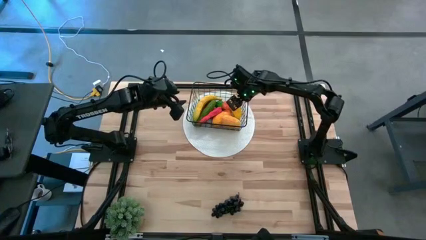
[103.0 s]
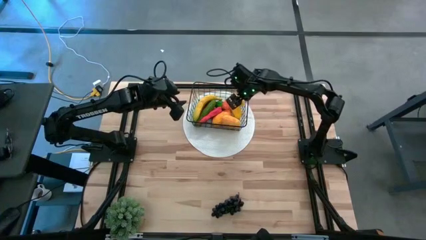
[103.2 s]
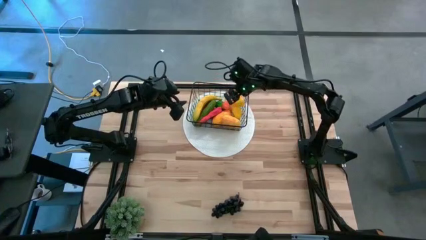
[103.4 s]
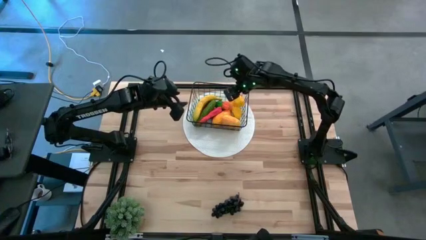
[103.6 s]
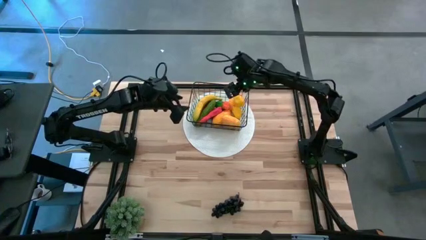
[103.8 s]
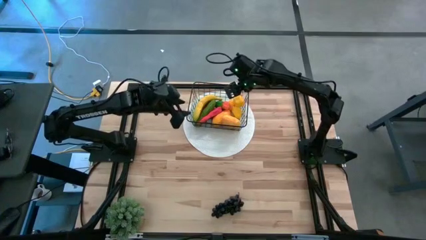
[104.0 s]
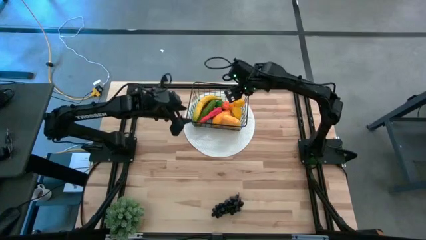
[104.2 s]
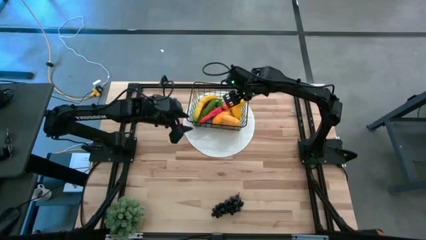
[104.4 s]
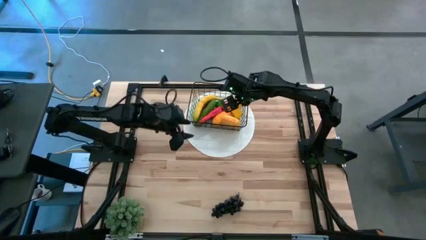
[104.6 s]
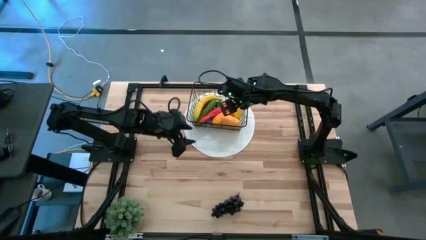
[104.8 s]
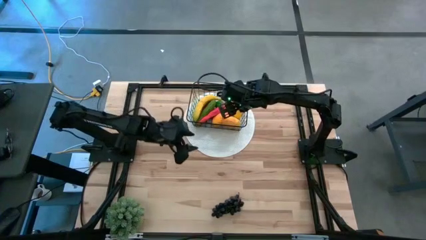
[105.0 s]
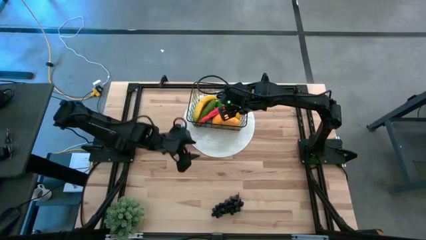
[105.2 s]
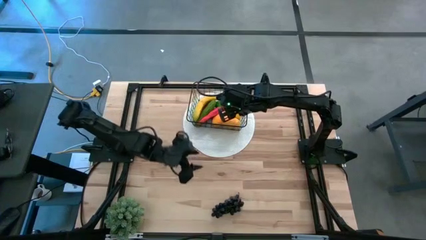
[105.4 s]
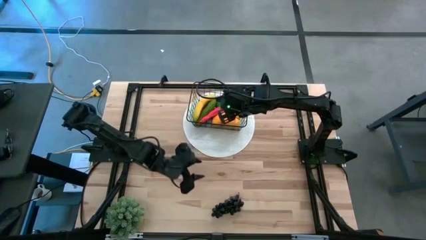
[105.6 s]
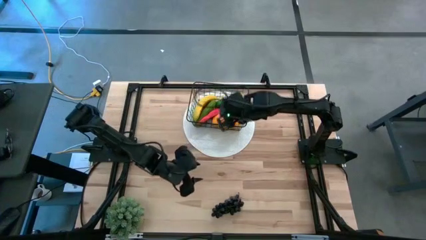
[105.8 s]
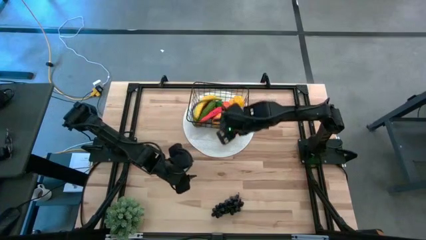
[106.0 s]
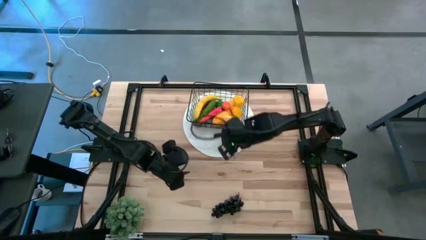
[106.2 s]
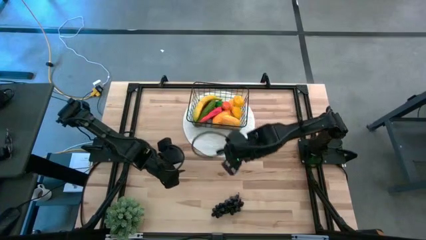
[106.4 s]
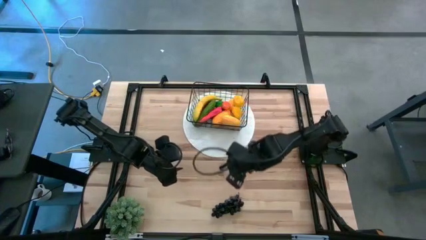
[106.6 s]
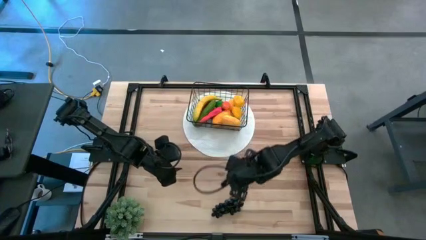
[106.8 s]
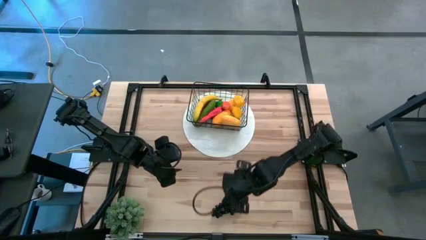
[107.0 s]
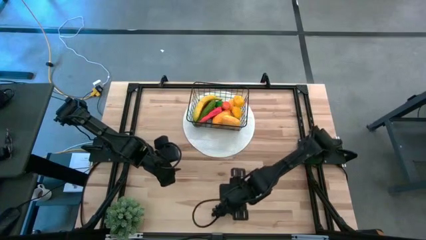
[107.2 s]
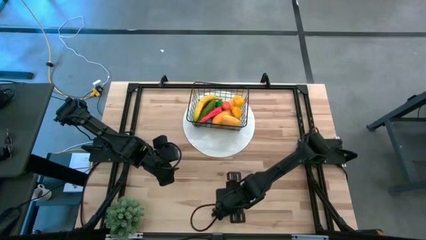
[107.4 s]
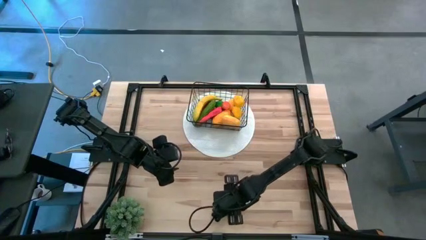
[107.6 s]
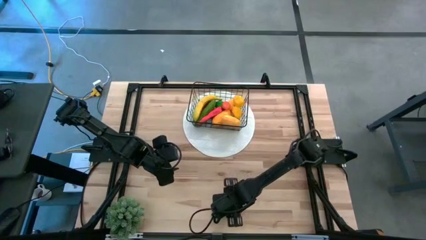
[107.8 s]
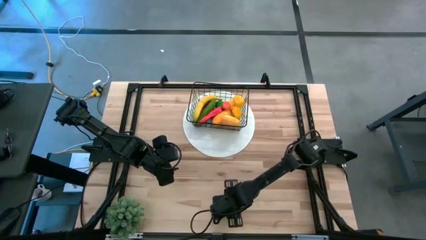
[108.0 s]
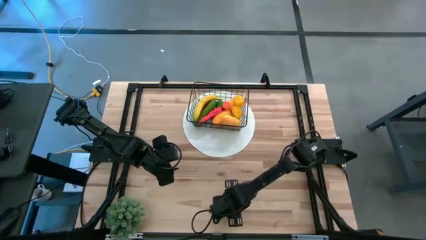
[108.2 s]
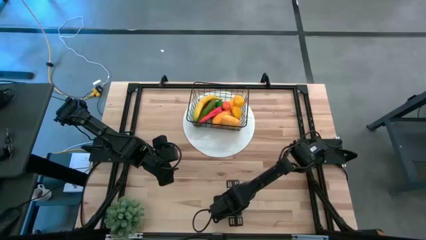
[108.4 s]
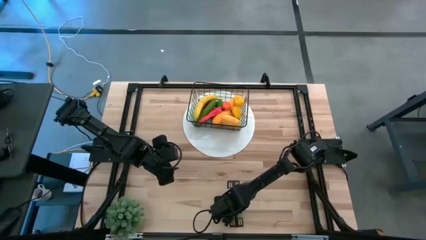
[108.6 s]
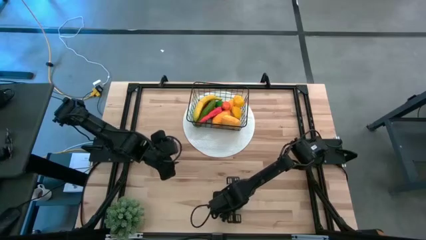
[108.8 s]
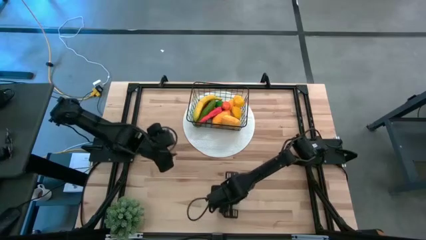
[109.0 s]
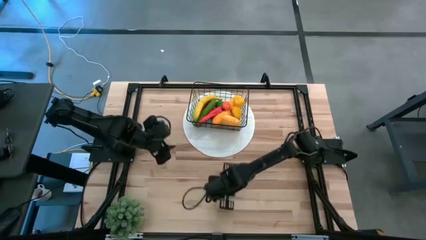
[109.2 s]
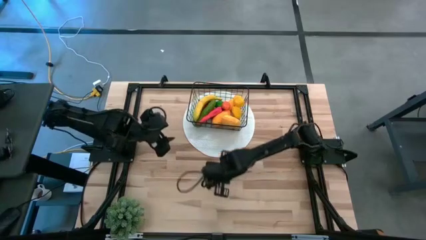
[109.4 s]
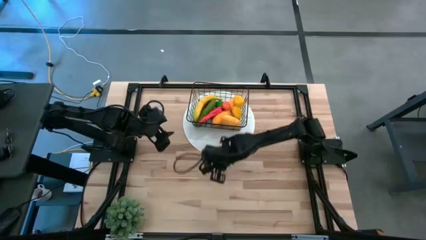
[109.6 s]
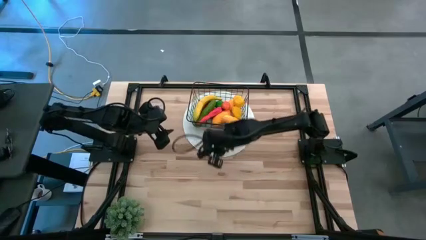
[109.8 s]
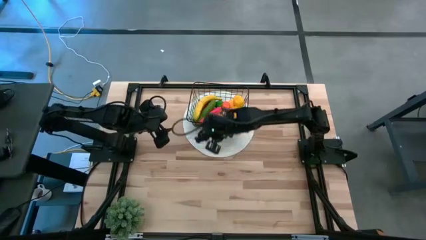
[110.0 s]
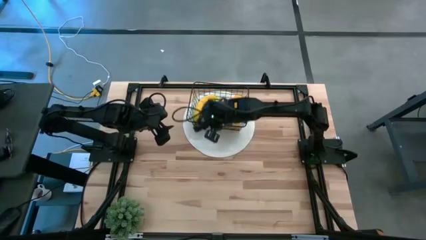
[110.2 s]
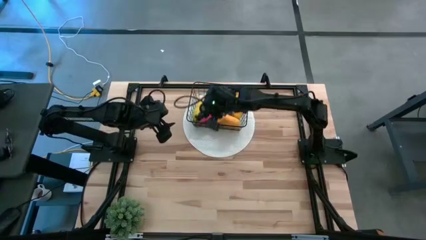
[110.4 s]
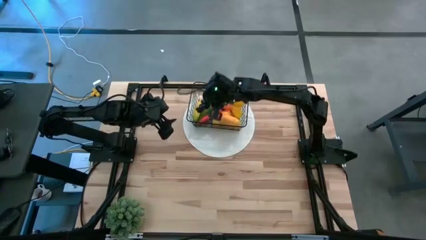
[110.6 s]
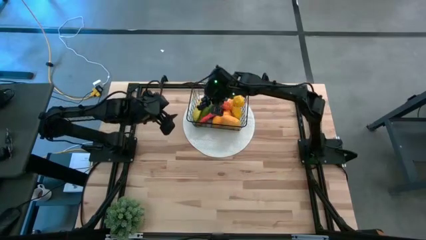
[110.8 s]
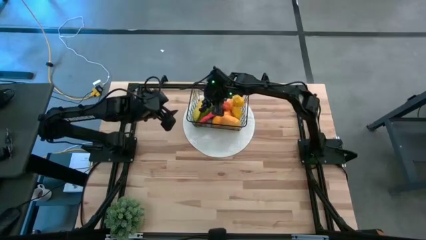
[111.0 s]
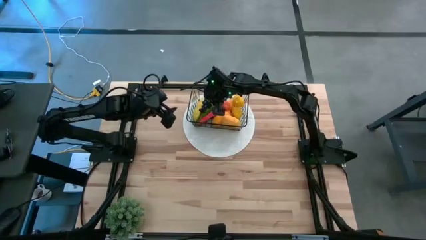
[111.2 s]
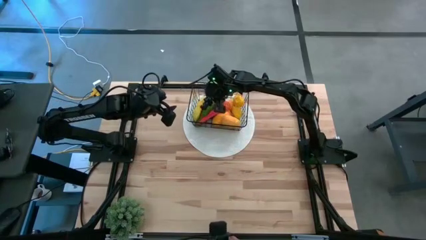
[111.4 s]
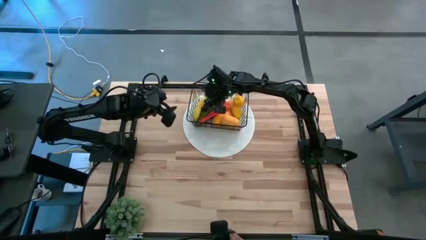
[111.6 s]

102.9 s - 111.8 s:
Task: Build produce basket
Put the grapes into the wire basket

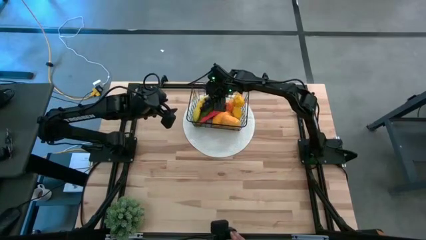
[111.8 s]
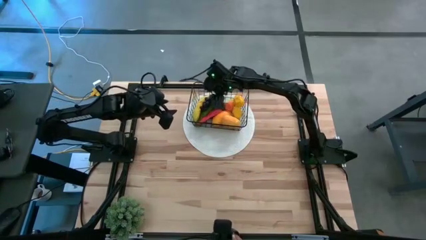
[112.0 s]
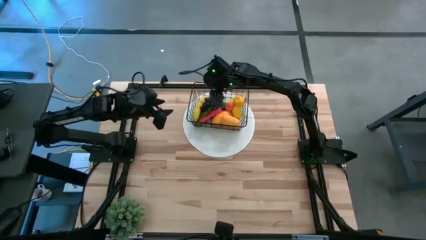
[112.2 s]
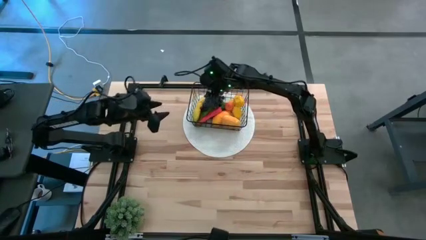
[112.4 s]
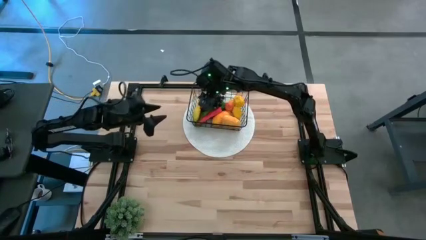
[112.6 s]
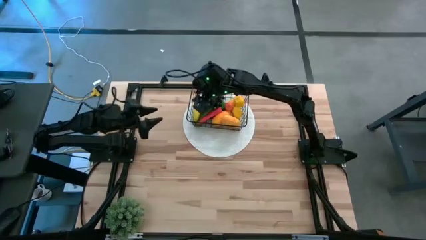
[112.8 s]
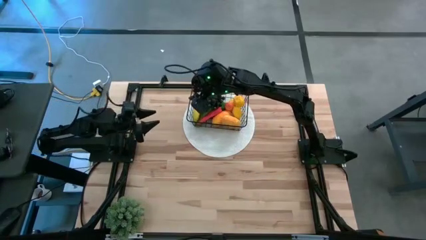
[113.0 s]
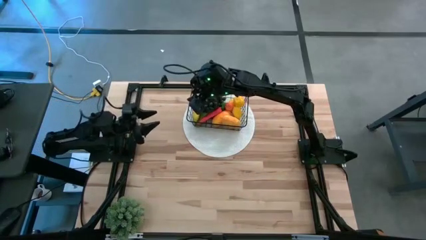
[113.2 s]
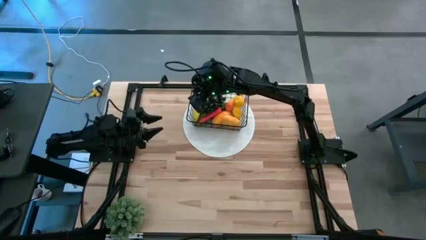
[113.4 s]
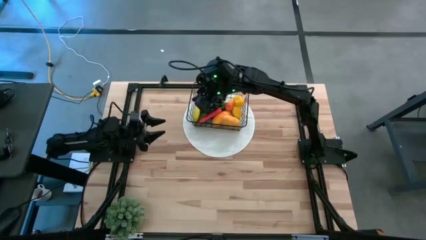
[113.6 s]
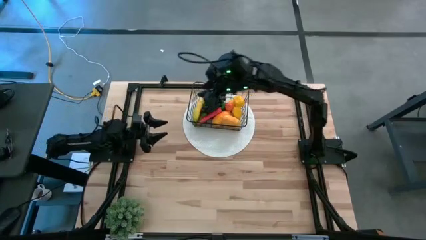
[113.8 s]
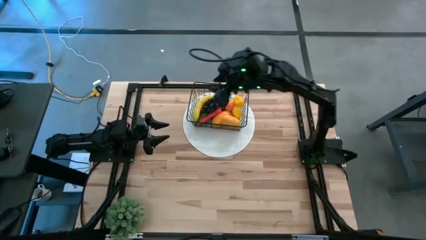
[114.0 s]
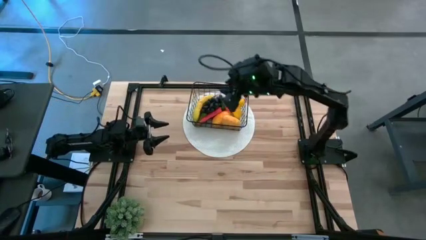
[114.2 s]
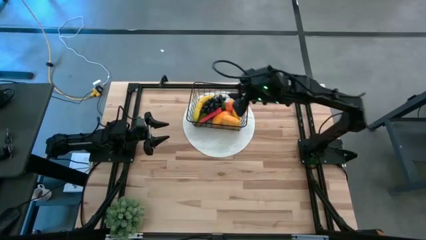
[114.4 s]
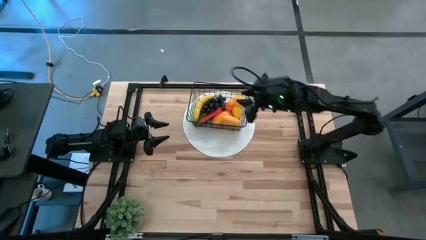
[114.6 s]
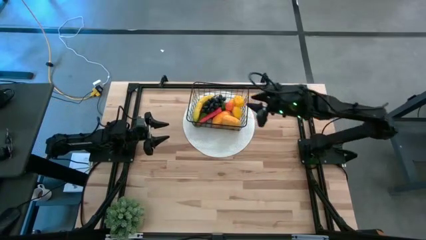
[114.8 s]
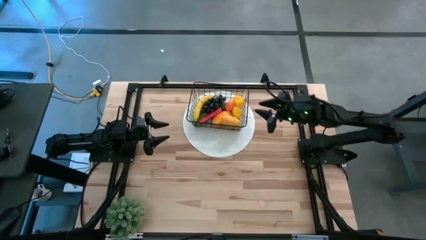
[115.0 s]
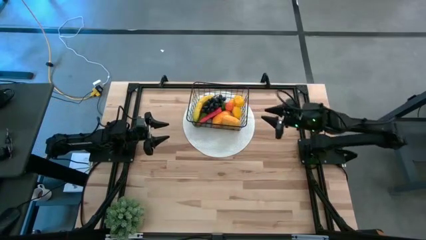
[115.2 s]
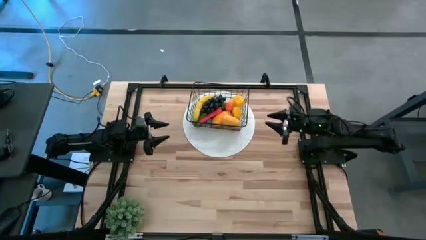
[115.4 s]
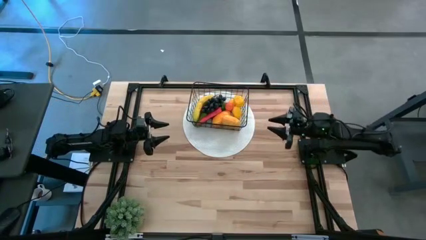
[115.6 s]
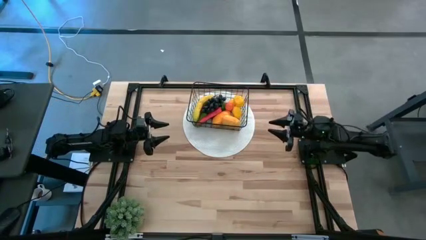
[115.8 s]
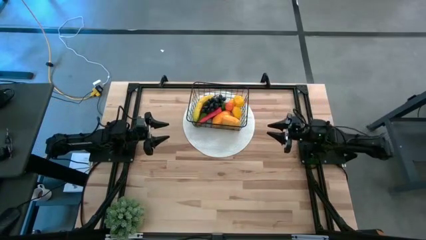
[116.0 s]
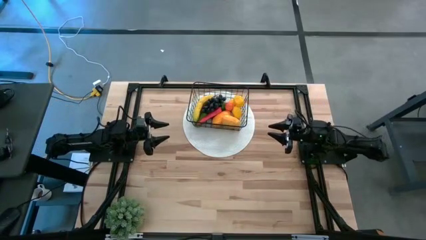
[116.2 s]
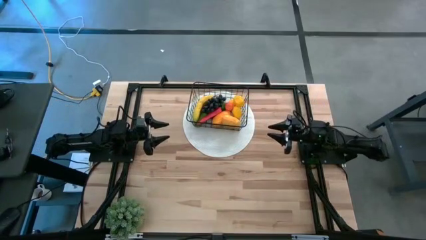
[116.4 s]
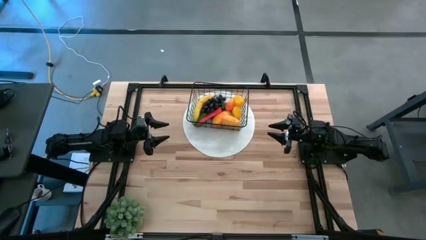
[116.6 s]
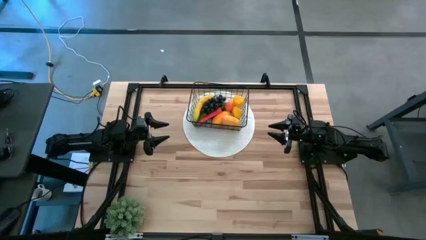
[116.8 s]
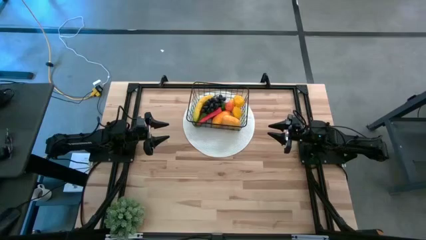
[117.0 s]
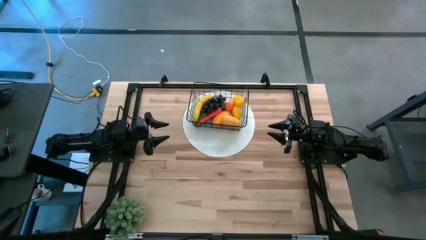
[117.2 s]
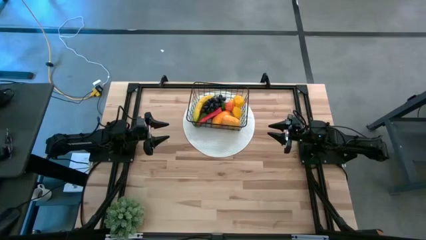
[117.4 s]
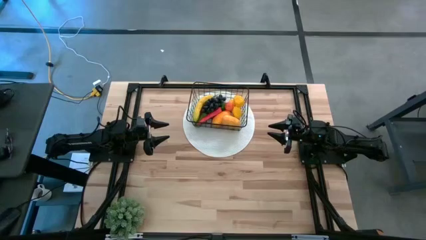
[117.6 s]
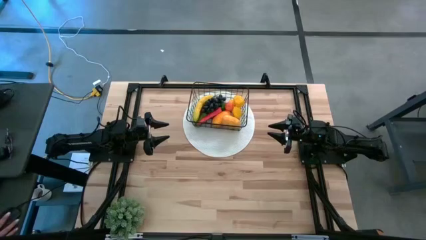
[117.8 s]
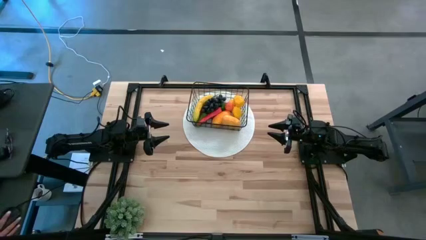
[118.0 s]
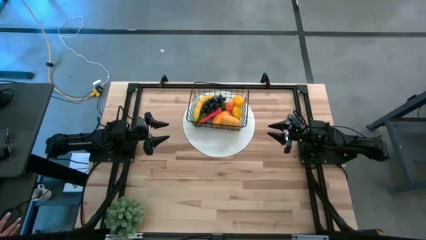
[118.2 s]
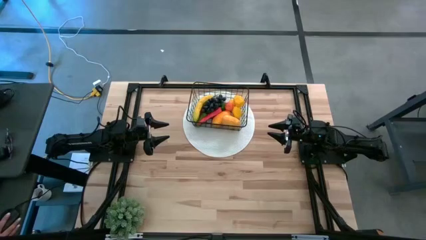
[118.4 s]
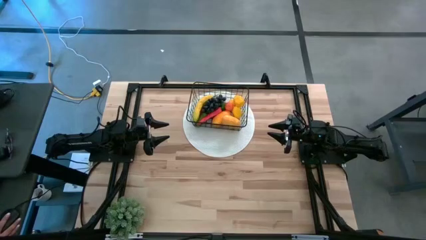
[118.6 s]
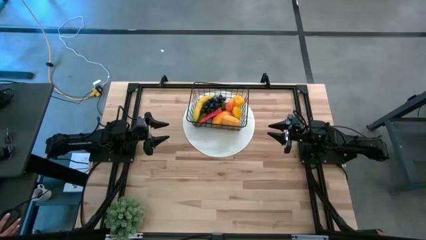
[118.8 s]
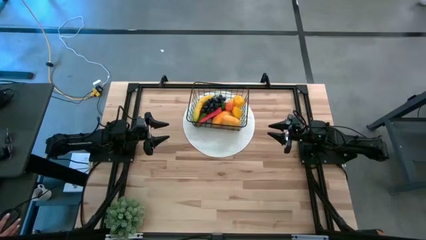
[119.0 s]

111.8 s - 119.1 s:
Return to Home Position
